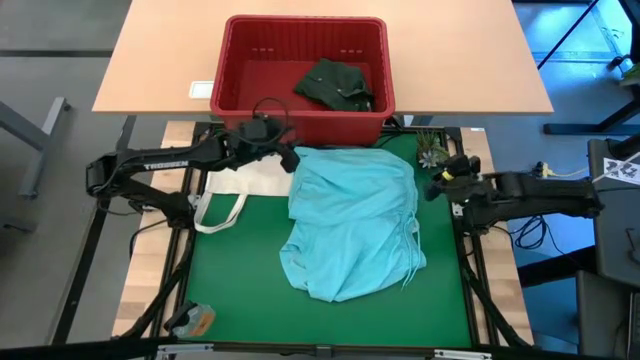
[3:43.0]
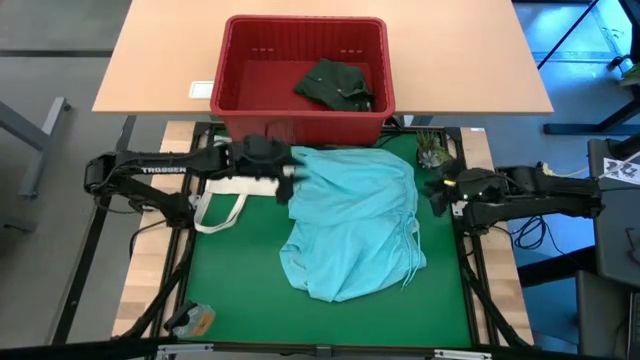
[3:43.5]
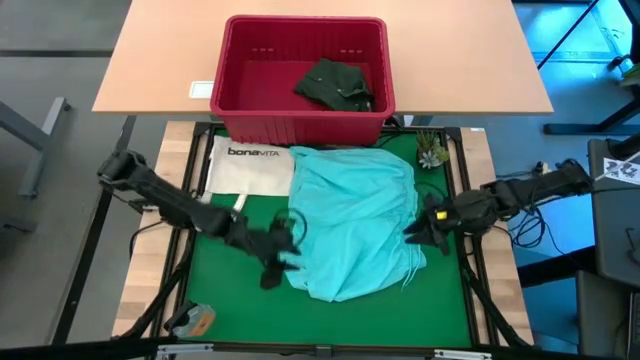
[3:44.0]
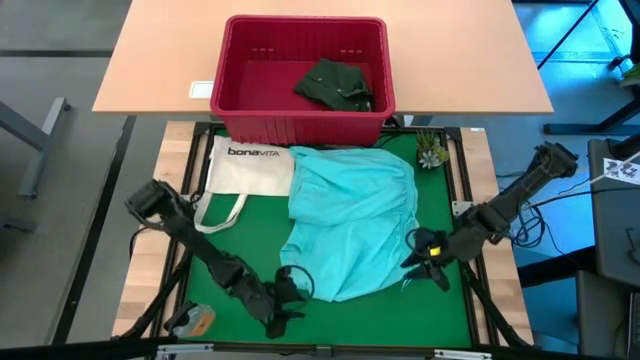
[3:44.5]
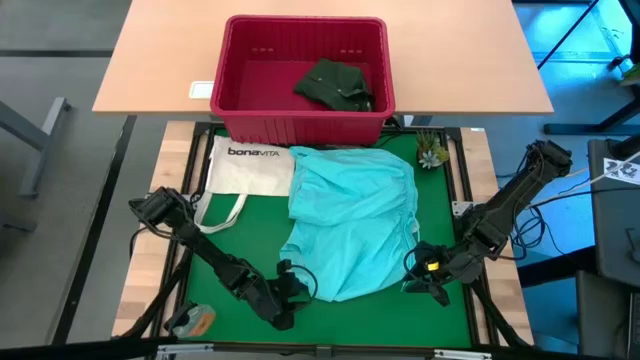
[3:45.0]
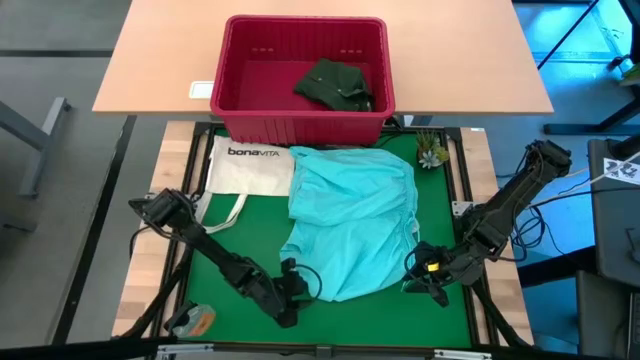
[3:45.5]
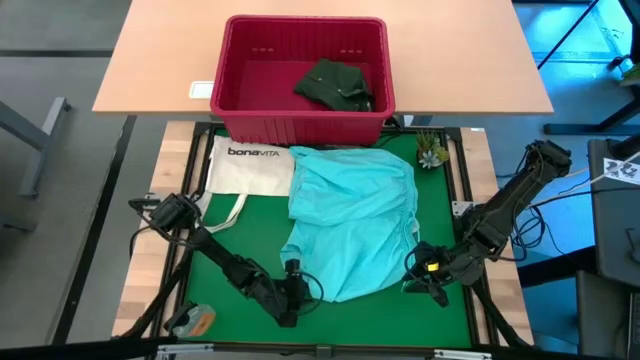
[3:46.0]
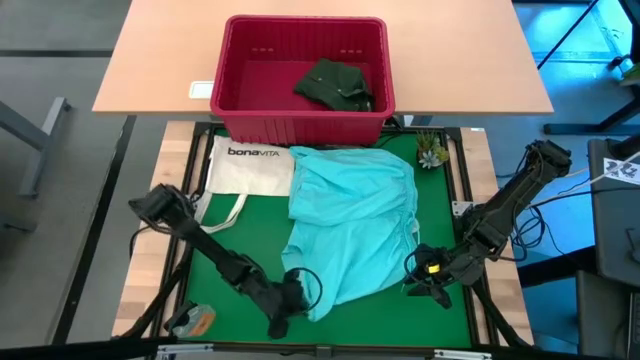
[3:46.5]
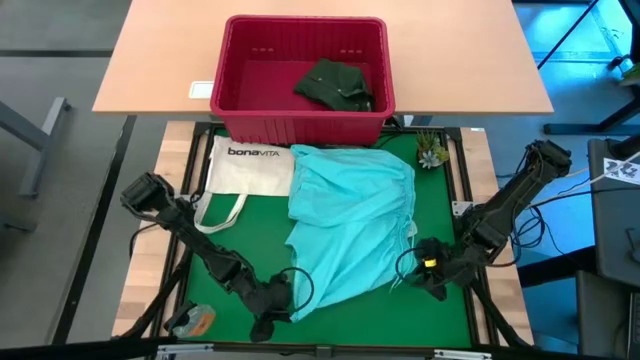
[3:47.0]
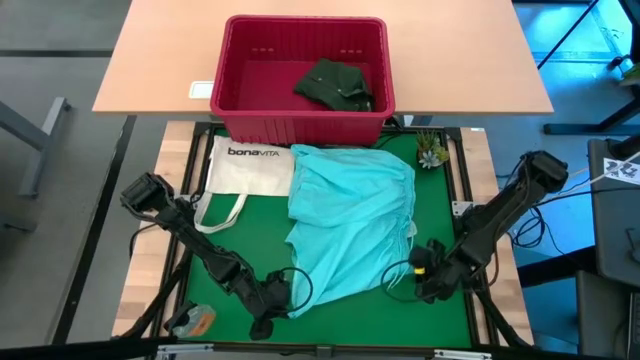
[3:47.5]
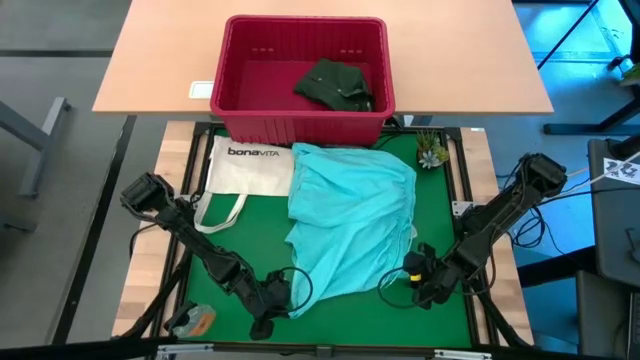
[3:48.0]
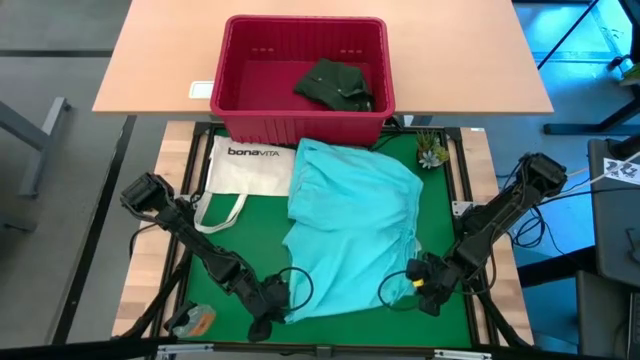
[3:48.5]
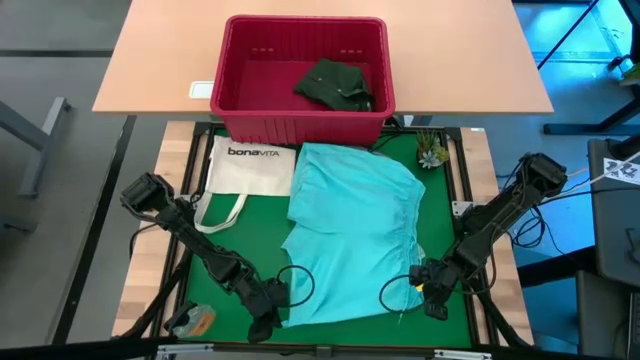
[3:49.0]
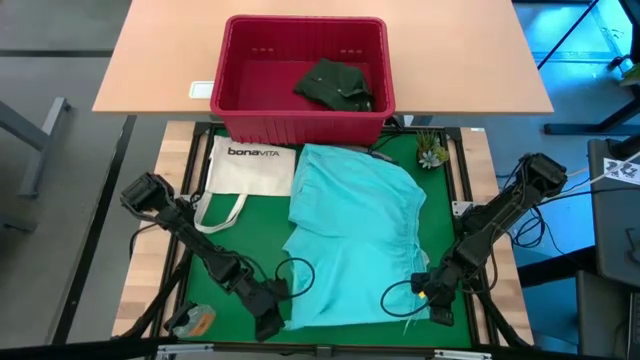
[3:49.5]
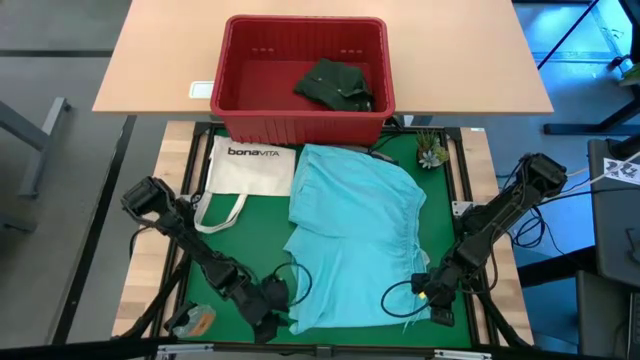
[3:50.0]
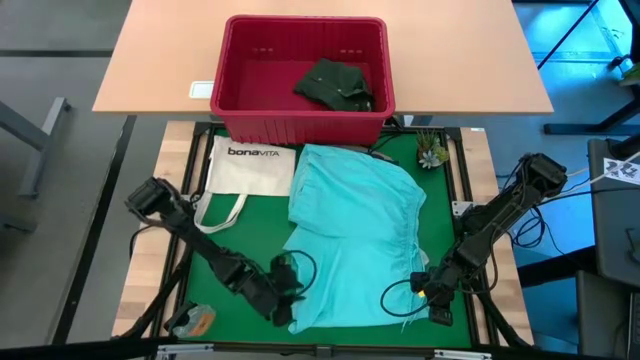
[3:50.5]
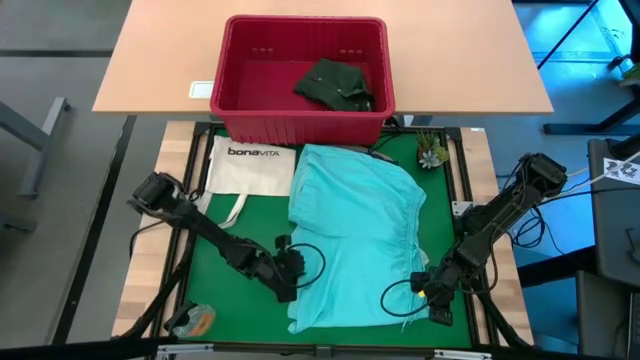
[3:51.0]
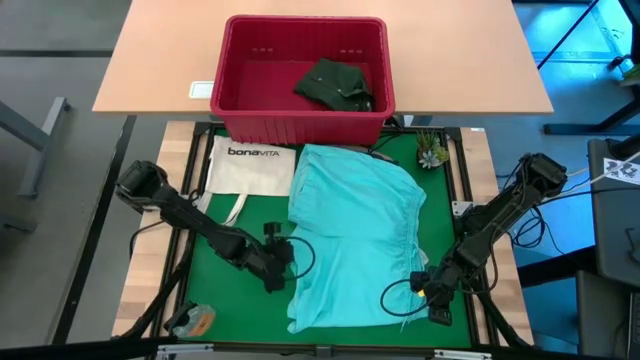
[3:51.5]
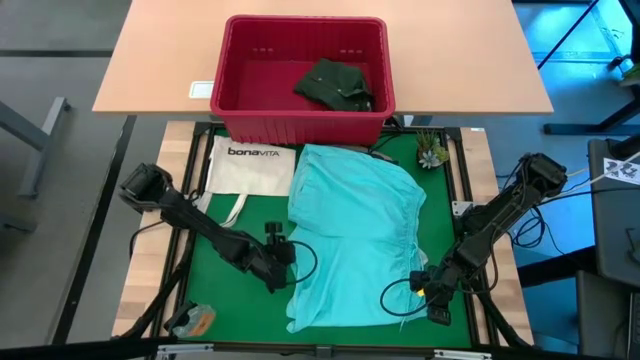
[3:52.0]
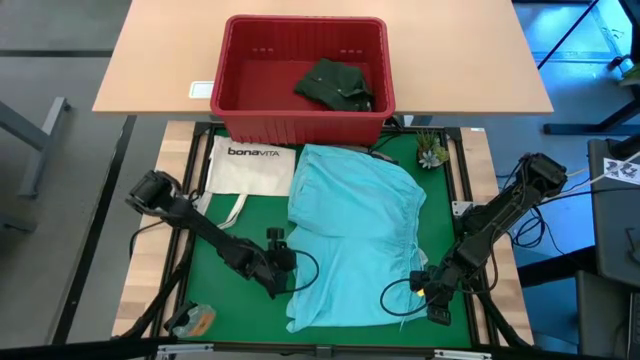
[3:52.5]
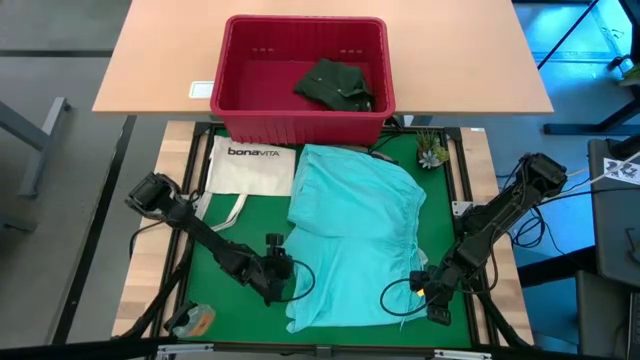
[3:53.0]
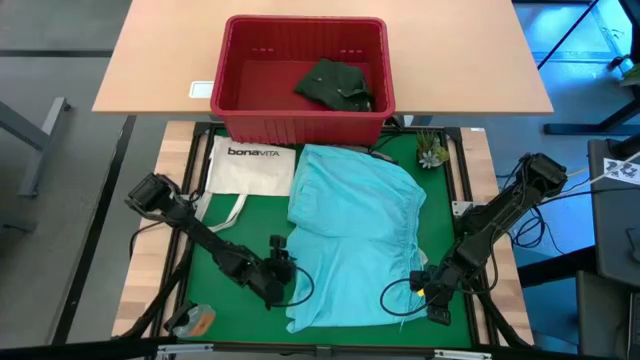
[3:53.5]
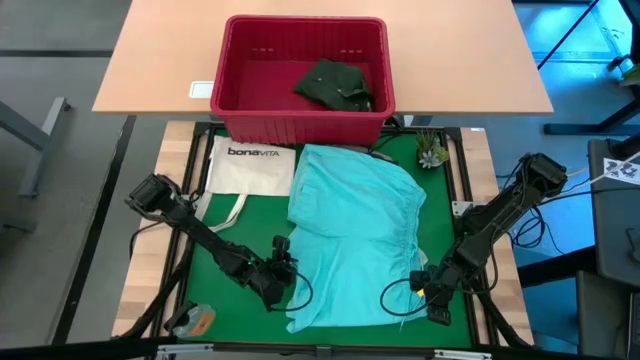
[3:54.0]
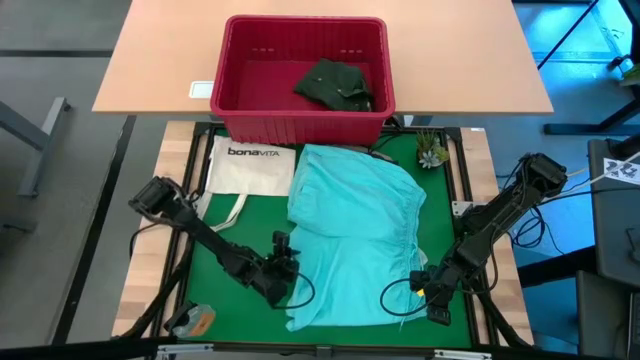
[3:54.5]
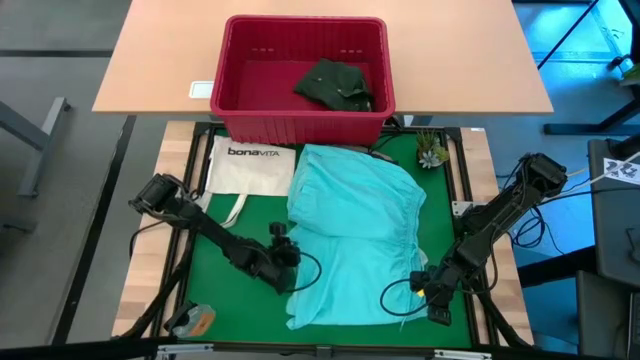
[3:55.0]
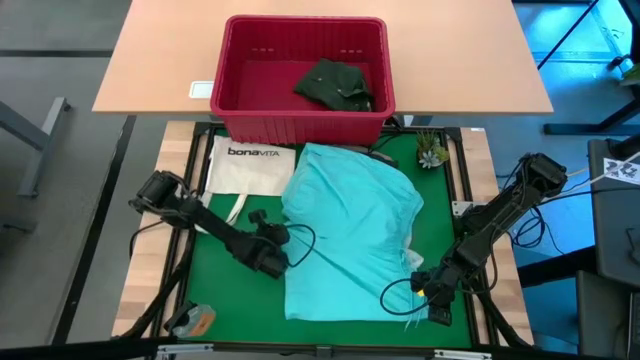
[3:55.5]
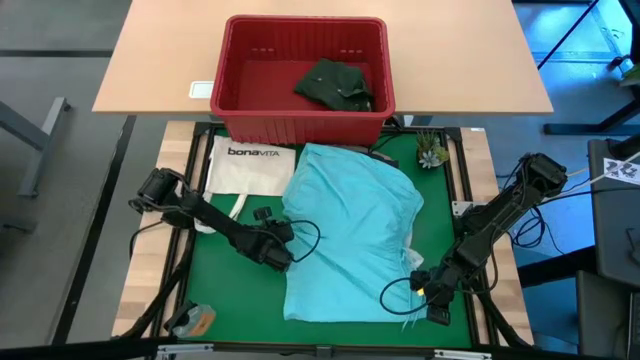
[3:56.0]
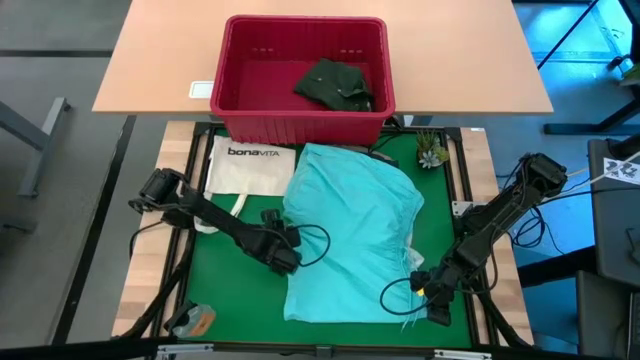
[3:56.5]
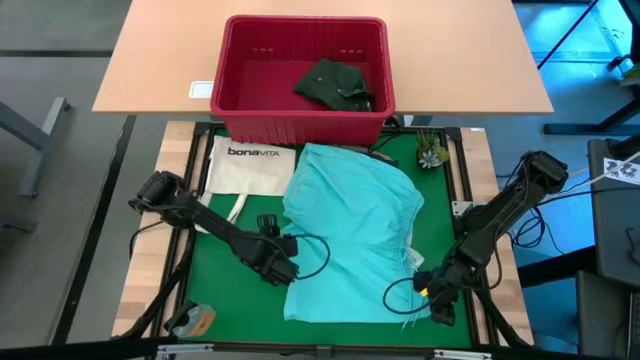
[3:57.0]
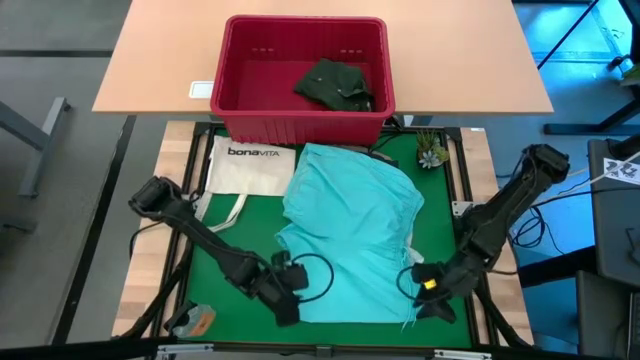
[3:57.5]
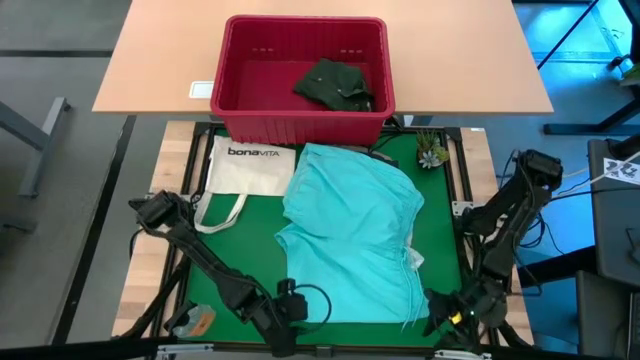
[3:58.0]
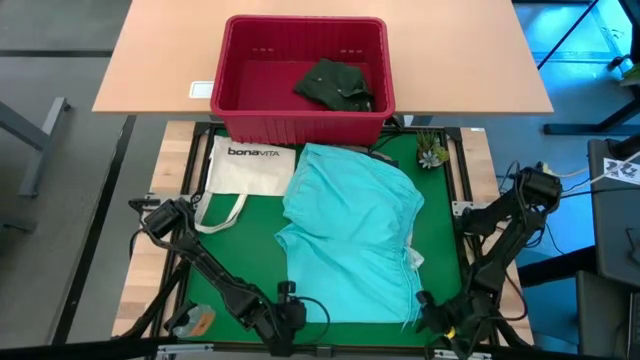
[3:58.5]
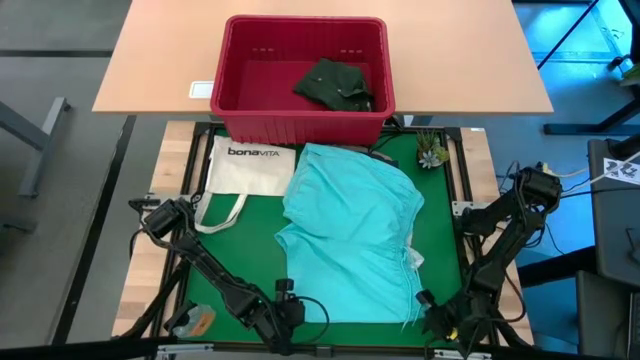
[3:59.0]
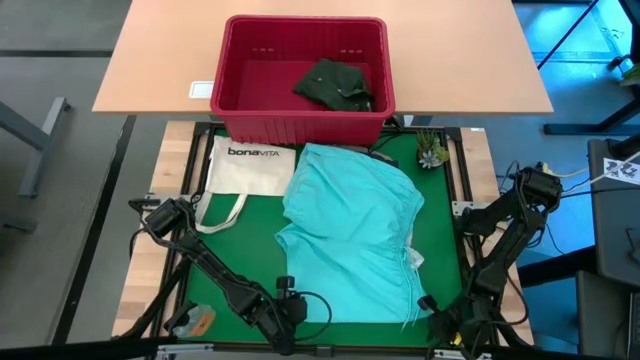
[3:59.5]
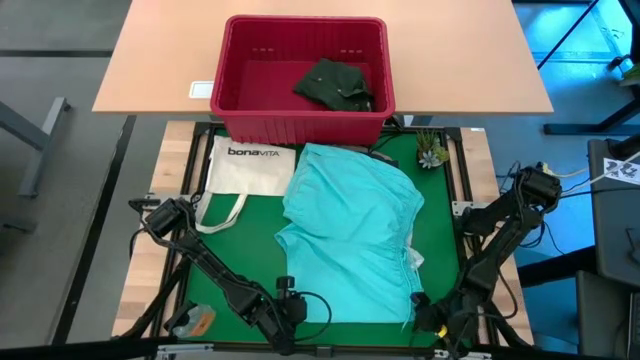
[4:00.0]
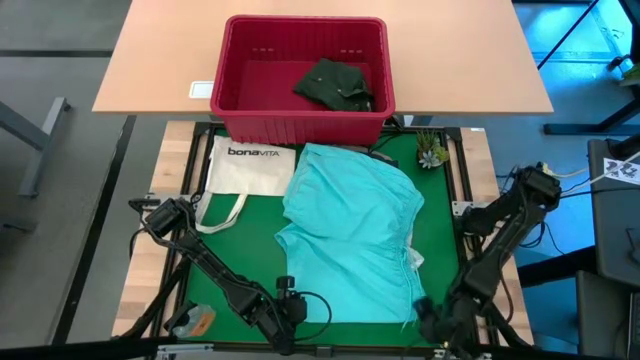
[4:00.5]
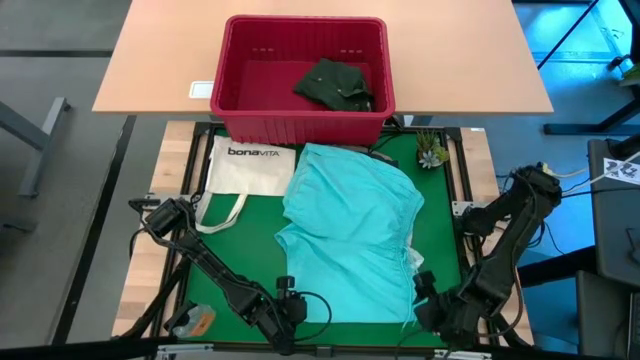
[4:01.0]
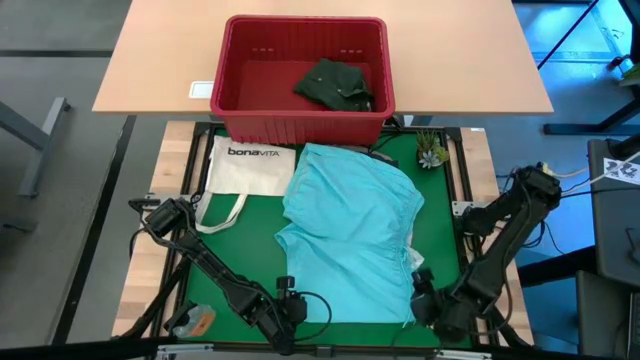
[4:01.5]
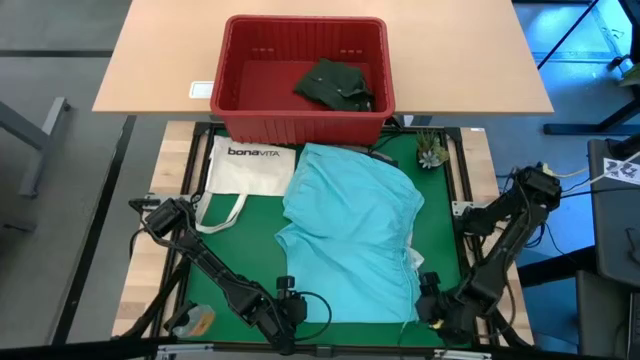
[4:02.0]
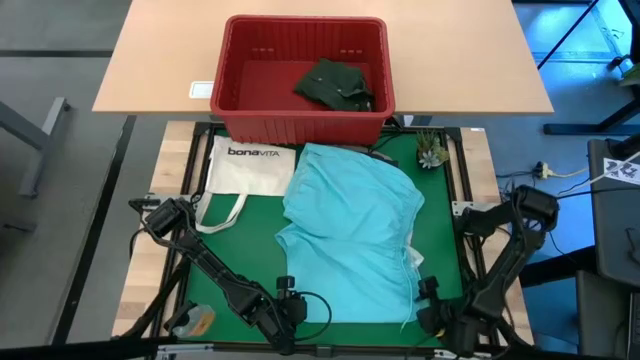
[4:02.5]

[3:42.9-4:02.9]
Task: Fold Laundry from Bin
Fold the light blue shorts from the red laundry bin

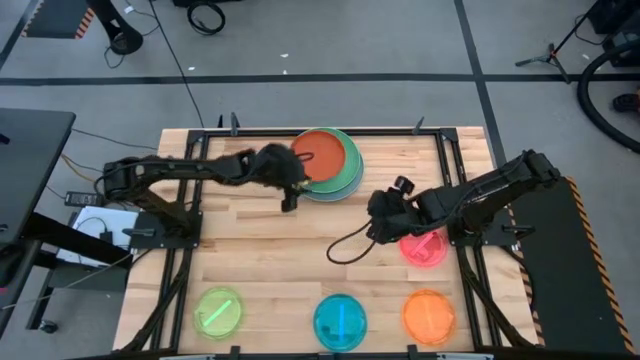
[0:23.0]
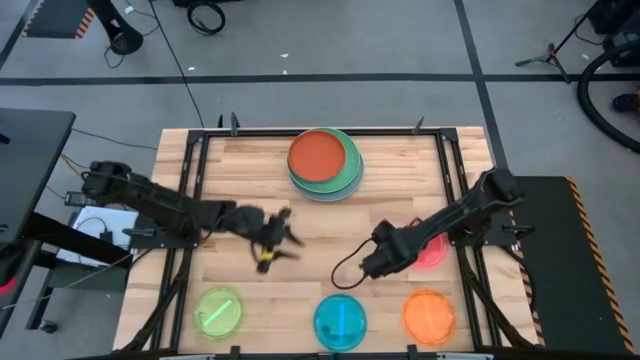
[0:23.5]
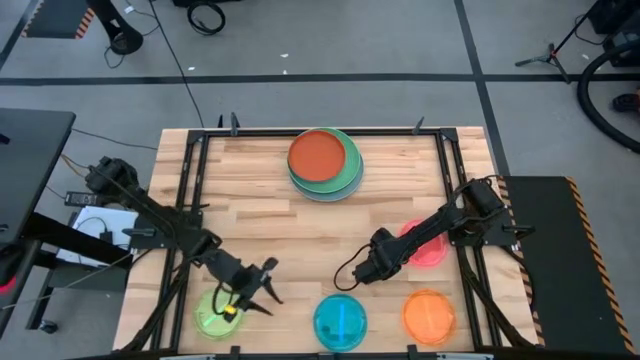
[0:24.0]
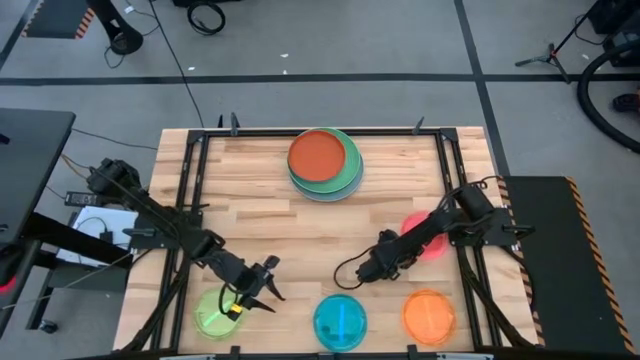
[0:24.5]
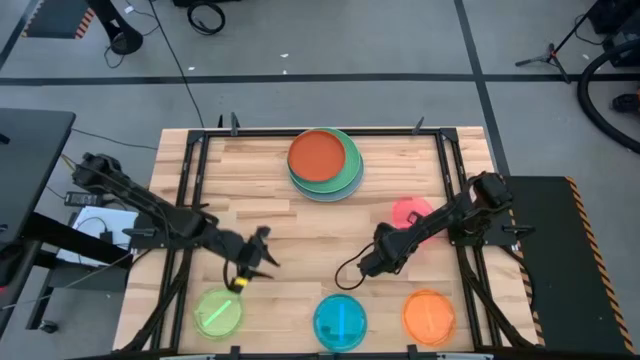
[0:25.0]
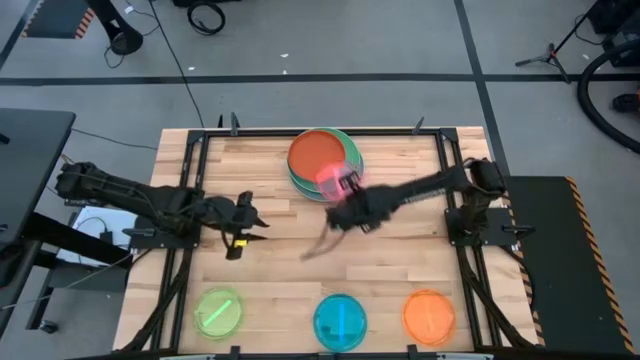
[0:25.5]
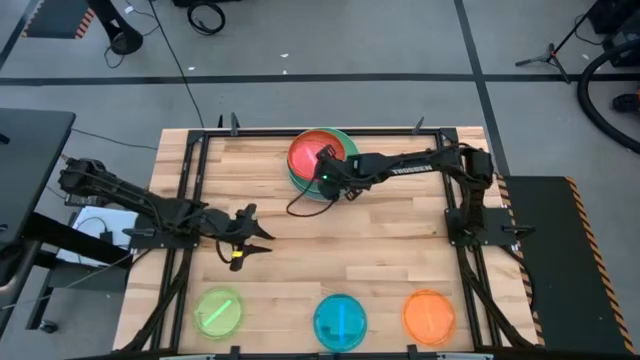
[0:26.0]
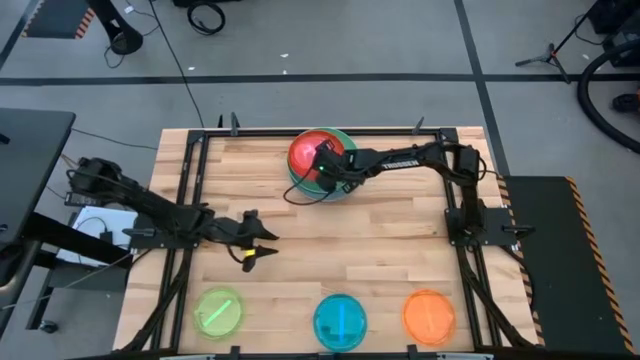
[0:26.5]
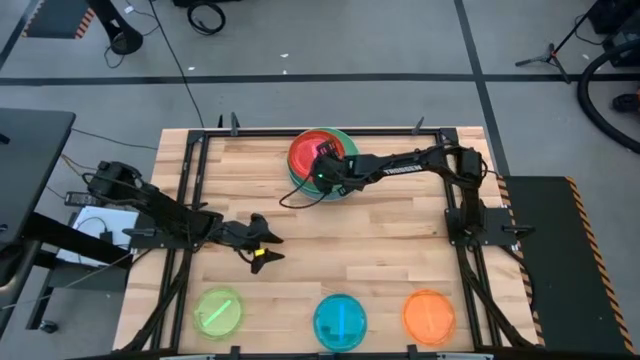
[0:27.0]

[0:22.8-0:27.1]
Task: Stack plastic plates
Stack the pink transparent plate on top of the orange plate
